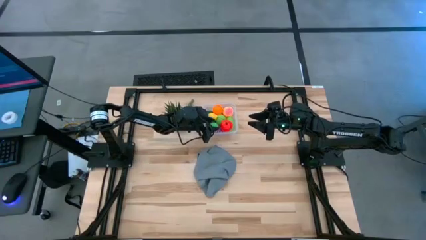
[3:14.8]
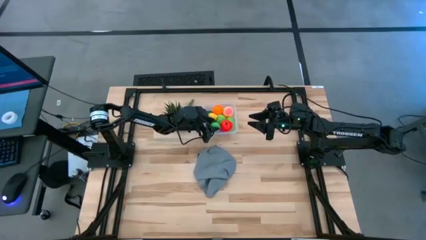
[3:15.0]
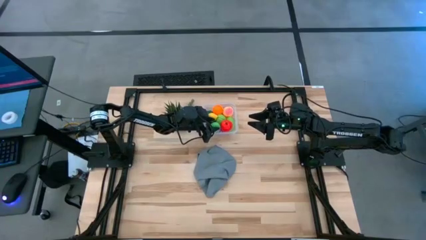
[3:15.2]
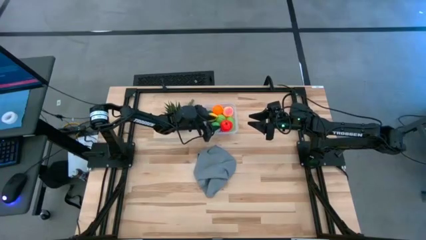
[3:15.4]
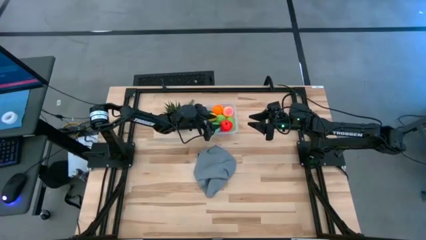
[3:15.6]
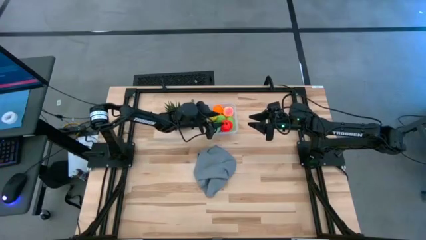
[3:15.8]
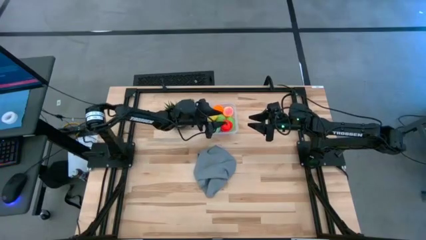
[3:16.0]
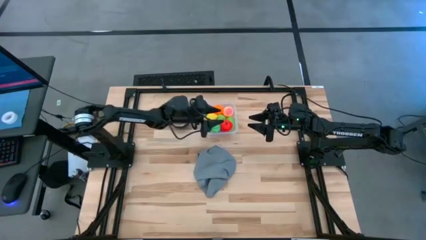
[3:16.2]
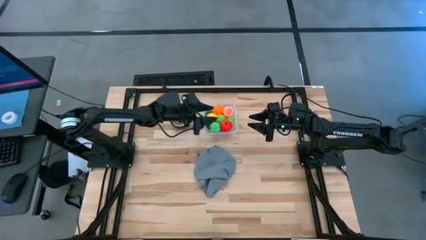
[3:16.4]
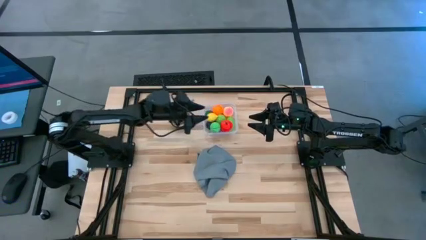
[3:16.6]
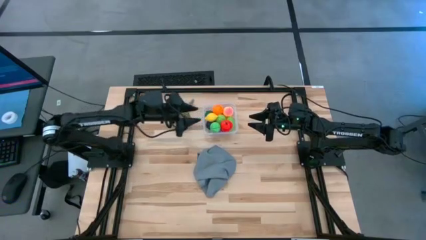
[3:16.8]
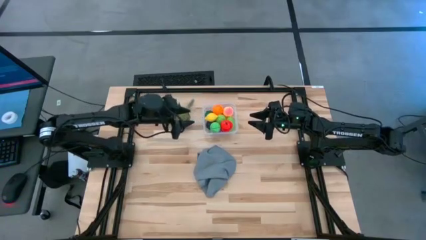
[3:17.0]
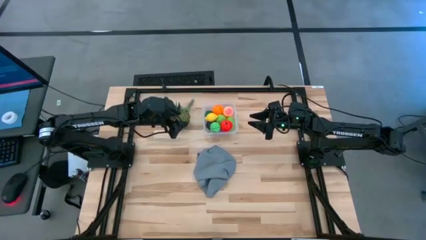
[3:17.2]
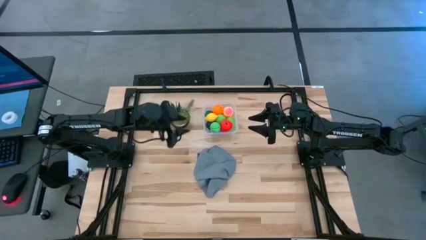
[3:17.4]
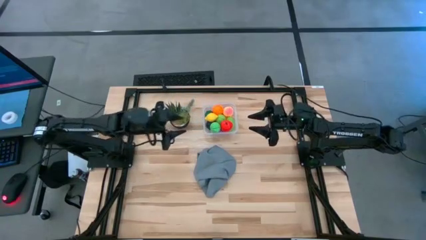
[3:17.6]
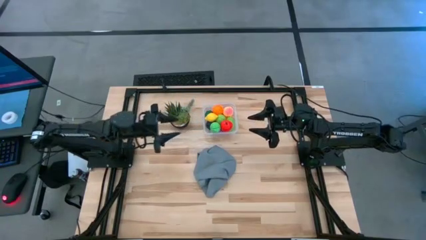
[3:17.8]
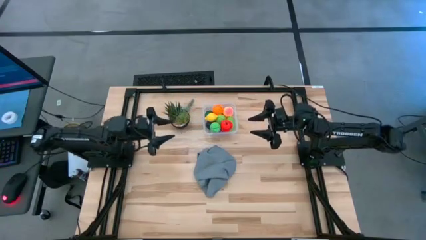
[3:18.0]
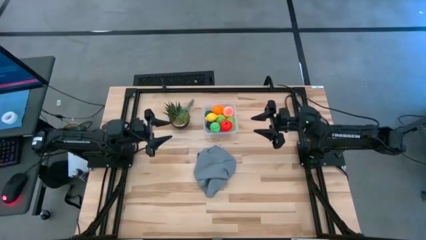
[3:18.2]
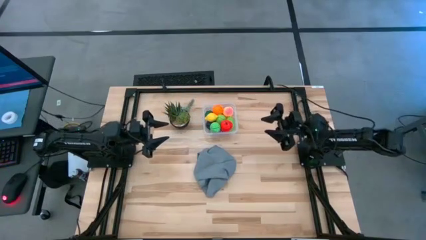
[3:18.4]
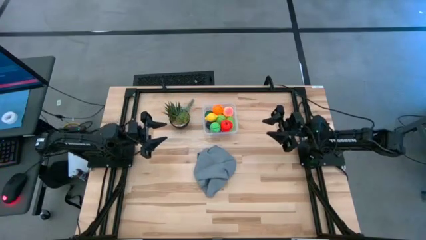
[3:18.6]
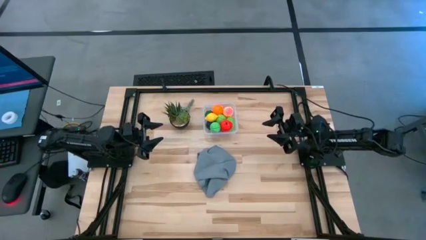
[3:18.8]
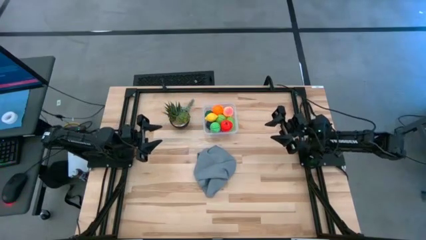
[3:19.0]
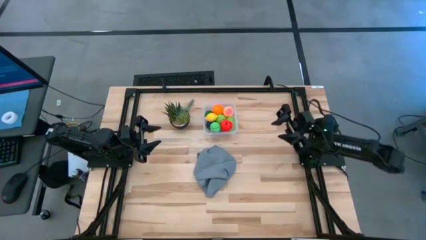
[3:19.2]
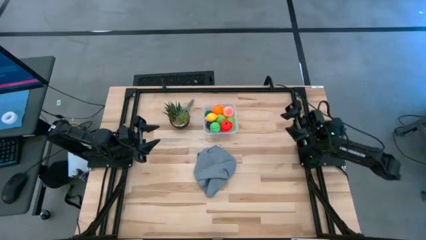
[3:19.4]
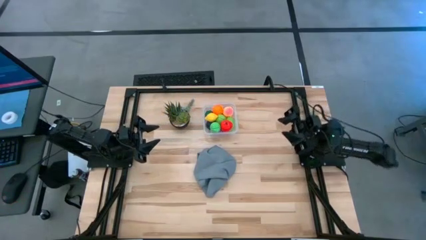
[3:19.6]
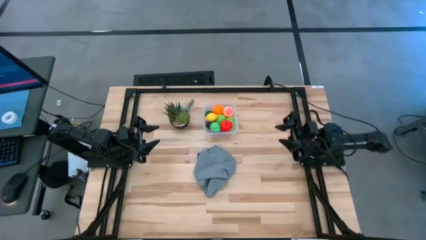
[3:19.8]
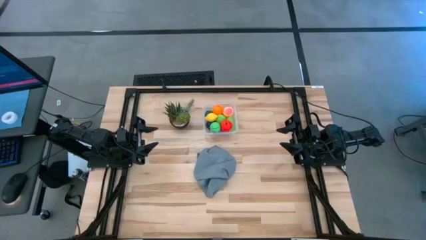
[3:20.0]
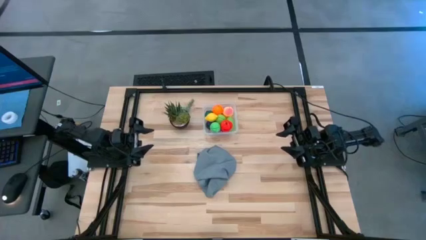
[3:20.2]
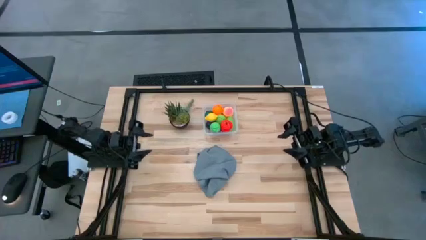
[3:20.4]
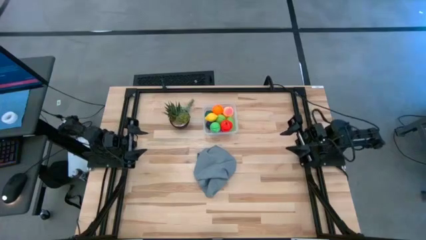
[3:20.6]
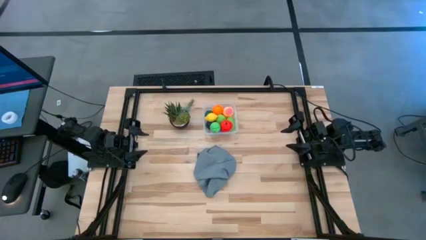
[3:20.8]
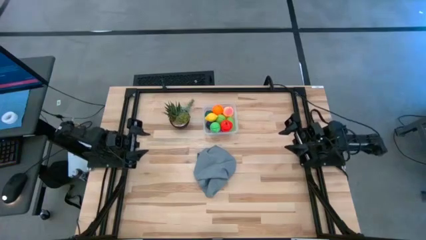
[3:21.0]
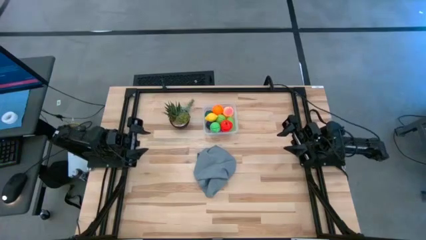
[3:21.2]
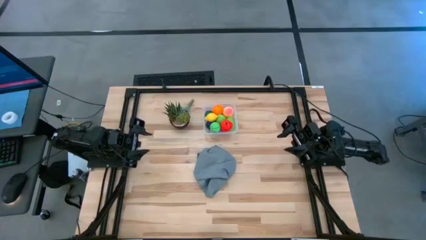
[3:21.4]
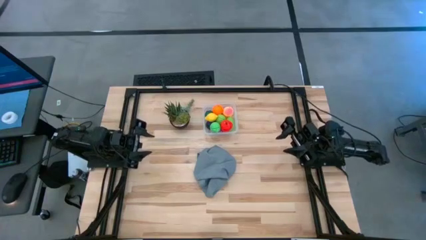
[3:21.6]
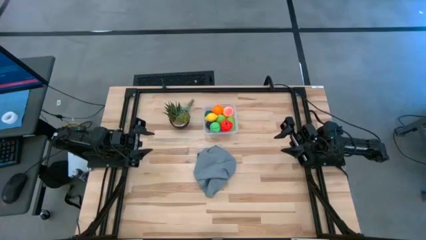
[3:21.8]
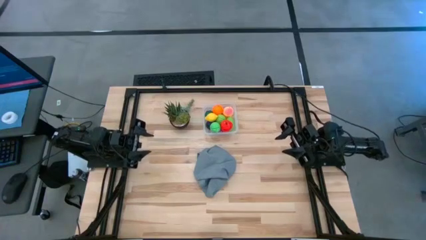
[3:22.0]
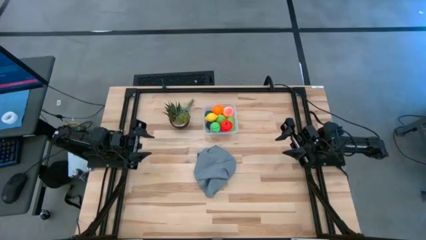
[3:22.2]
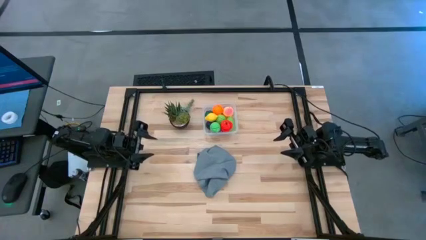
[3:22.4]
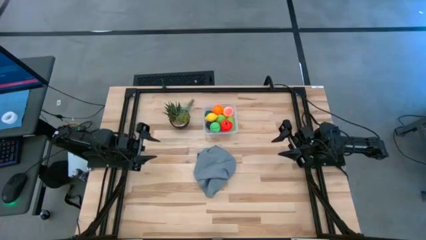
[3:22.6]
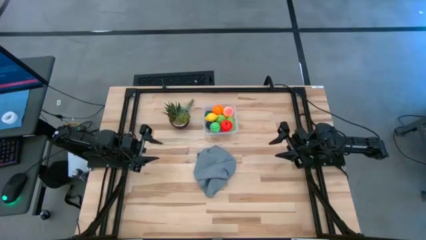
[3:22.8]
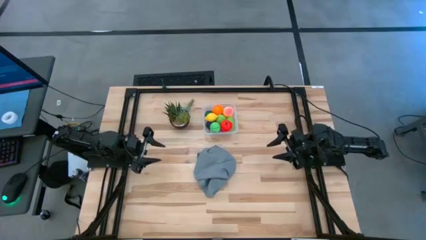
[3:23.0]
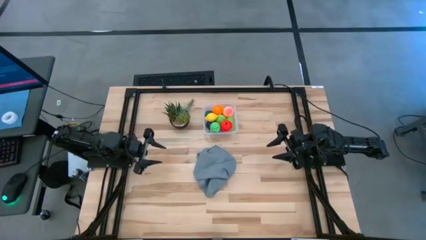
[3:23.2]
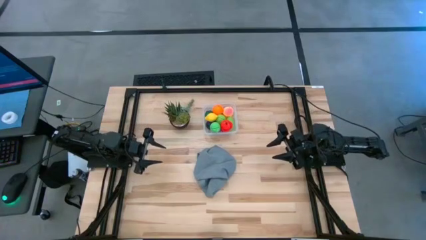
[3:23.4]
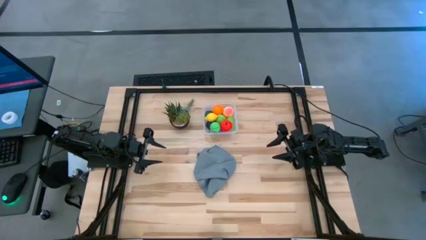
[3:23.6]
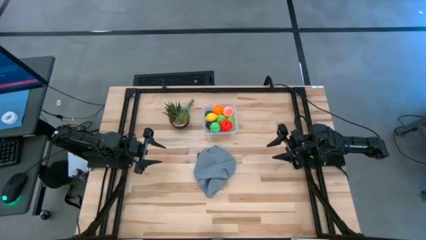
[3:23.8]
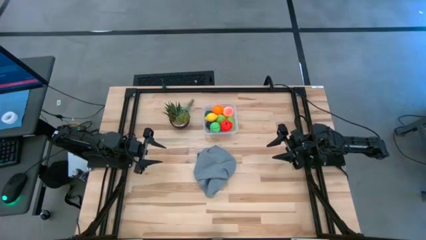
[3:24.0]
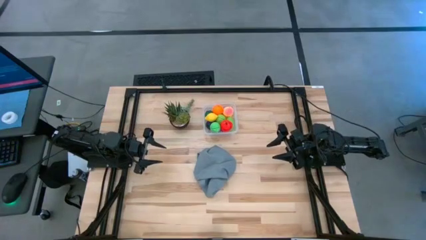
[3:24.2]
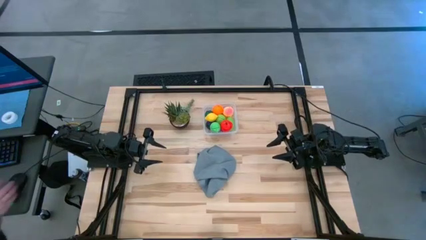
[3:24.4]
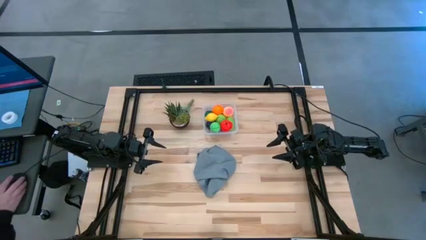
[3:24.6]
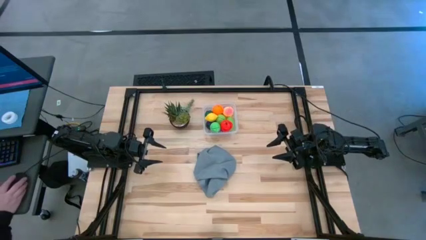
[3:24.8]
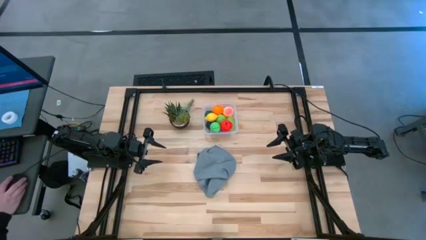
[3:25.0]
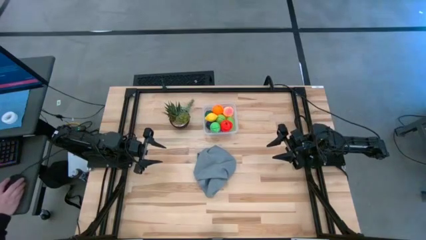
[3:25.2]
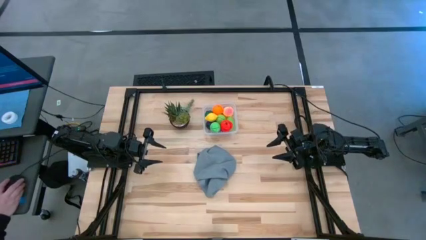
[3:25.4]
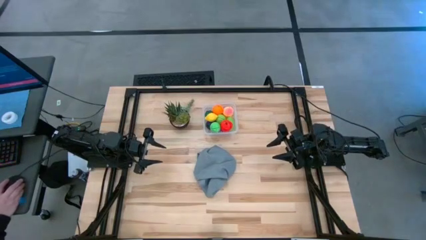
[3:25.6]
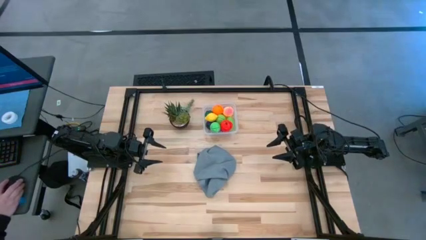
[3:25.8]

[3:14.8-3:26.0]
Task: Pick and placing Produce into tupperware
Return to Home Position

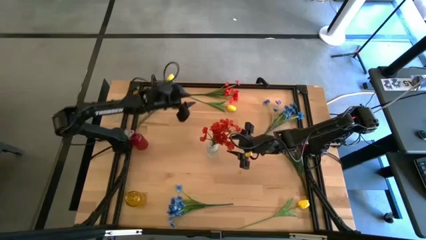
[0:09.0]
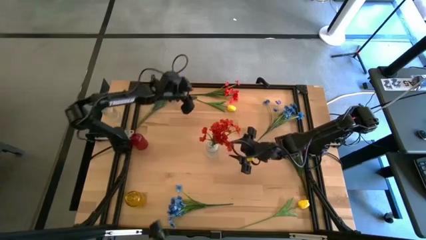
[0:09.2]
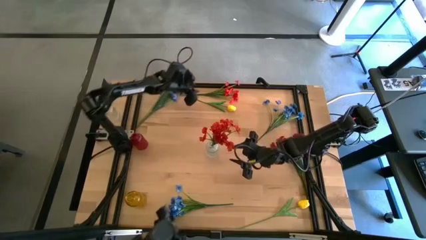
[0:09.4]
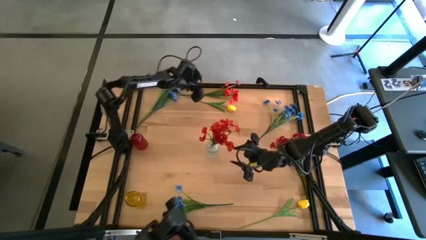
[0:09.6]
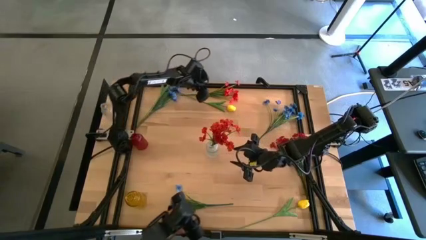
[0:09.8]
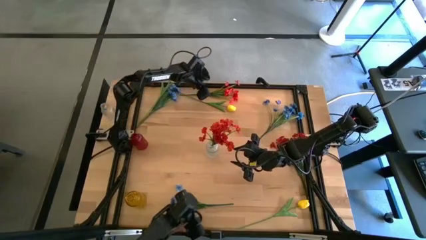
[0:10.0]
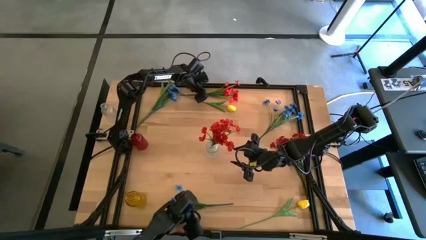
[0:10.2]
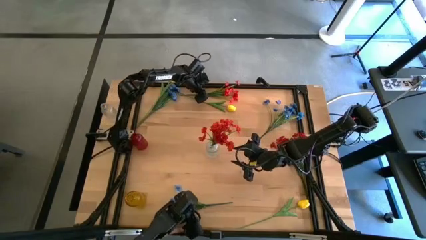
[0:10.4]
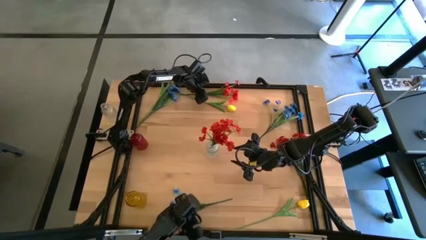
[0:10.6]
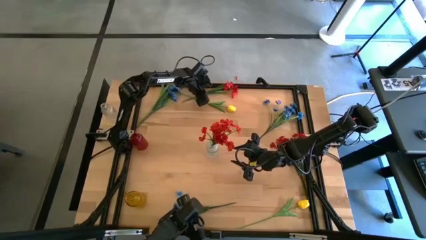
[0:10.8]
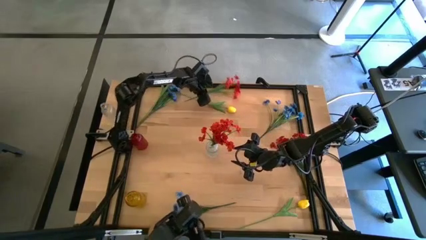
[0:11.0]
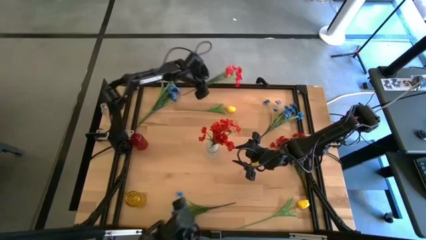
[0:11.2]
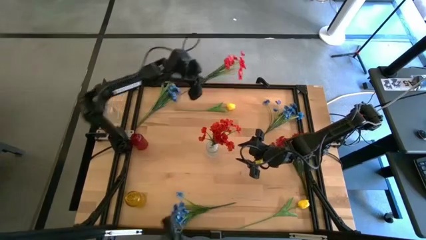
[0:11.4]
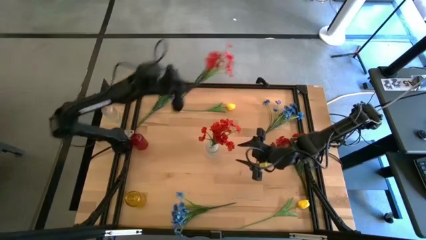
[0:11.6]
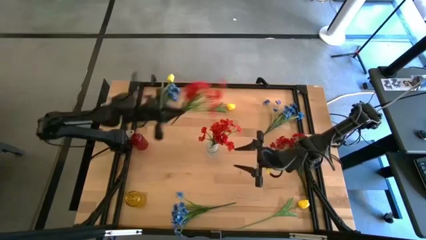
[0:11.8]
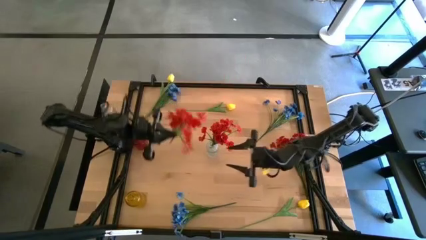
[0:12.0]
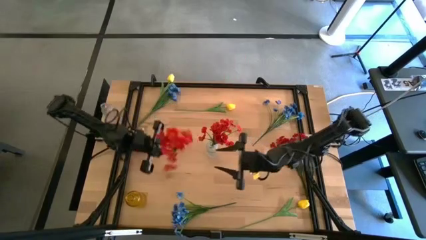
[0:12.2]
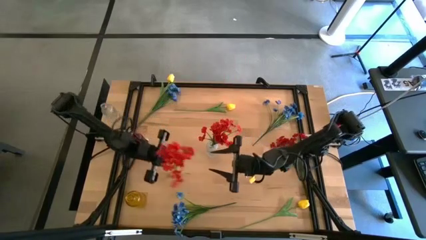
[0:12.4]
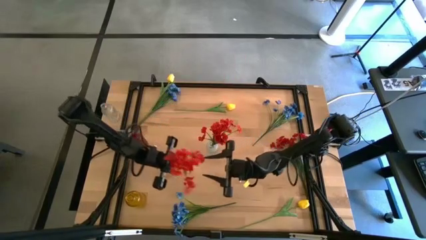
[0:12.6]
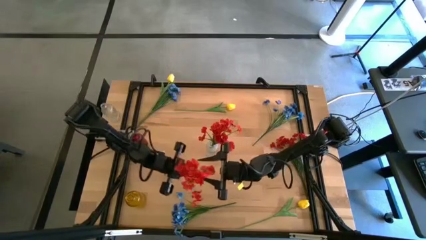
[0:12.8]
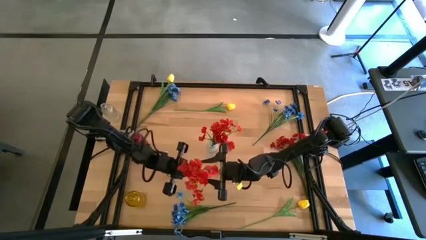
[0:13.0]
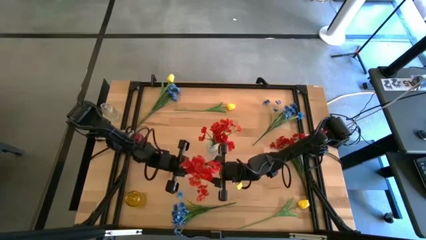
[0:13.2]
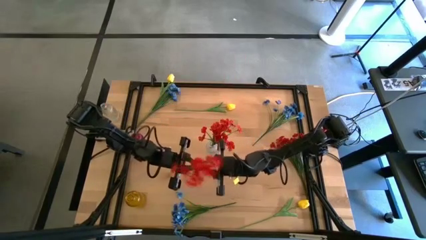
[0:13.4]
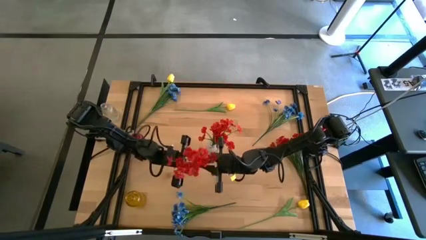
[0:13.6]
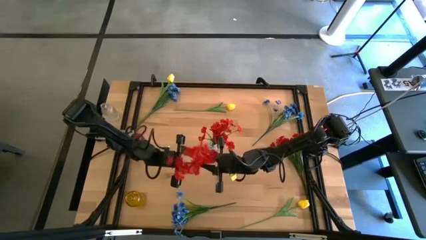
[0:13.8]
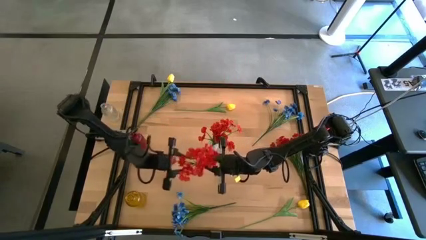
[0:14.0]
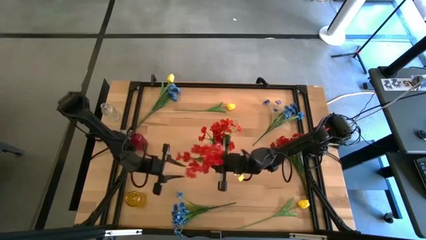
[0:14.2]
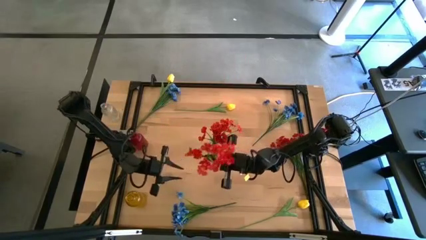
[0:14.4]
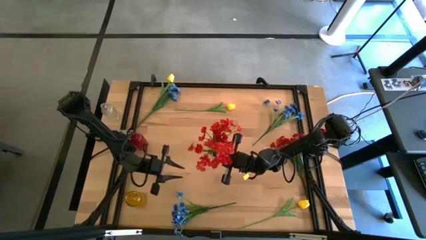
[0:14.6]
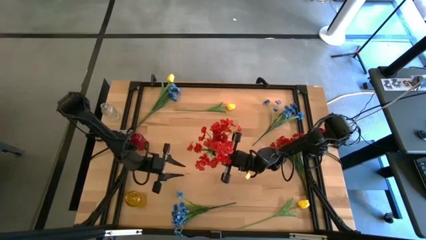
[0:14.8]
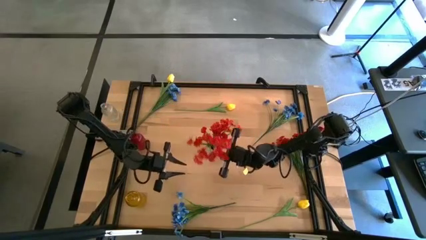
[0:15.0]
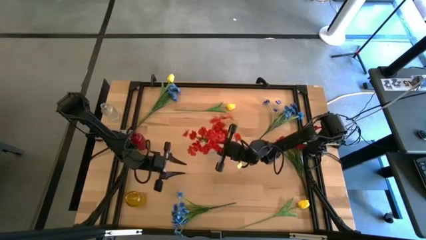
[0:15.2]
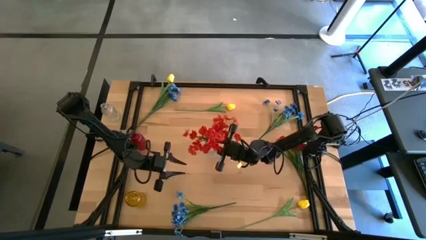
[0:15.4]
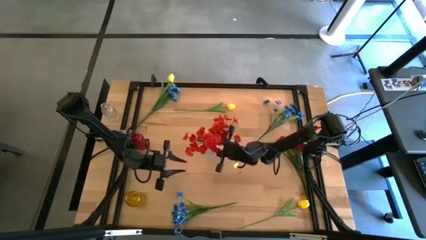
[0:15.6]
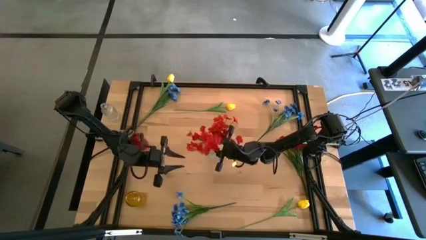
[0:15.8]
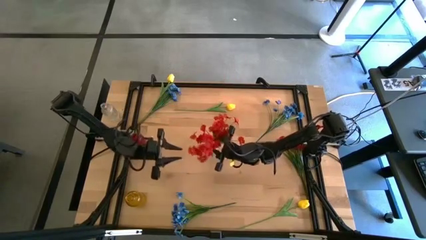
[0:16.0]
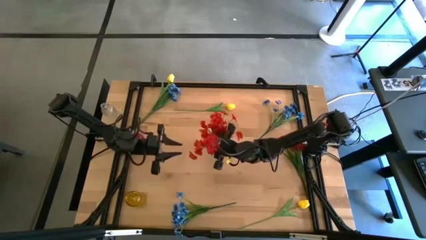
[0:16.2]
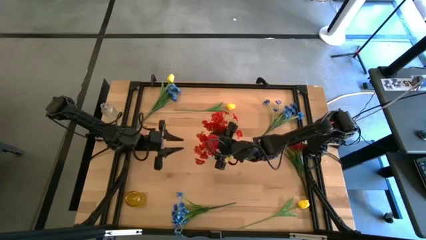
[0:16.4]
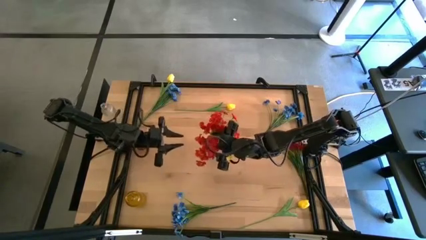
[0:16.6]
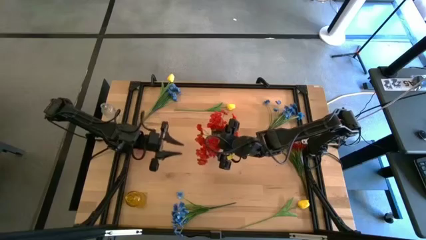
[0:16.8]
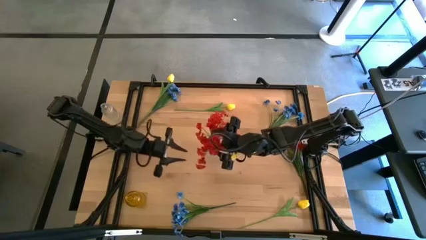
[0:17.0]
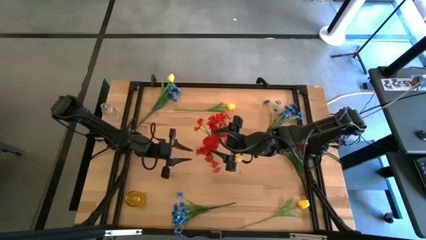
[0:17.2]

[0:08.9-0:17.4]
Task: Sort flowers into vase by color
Put the top red flower into the transparent vase
